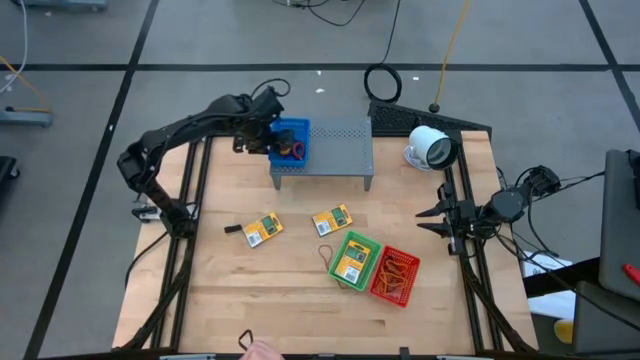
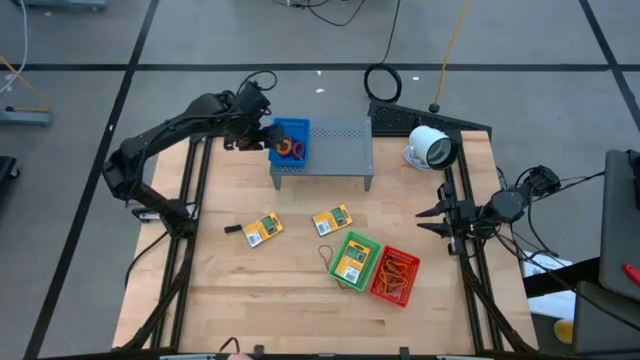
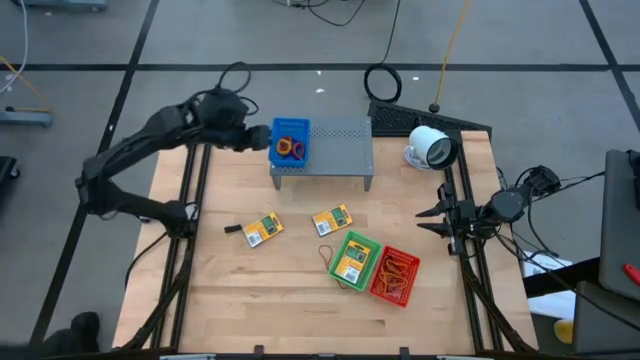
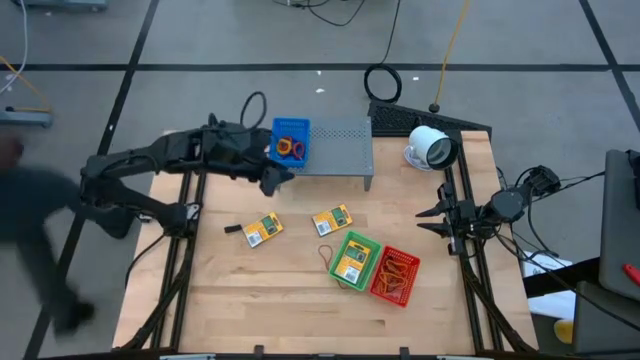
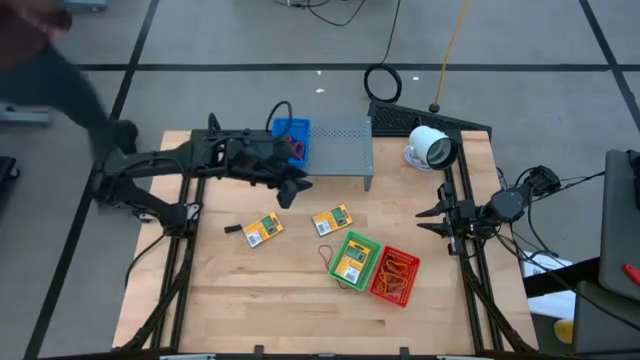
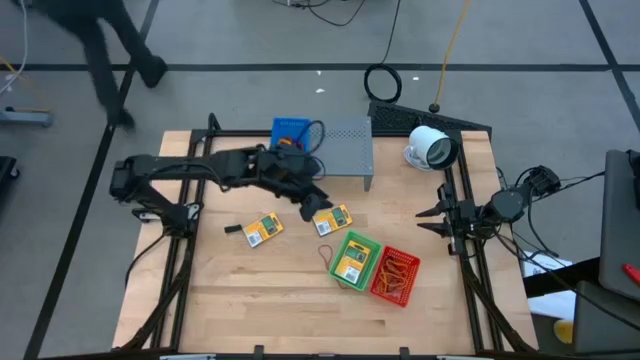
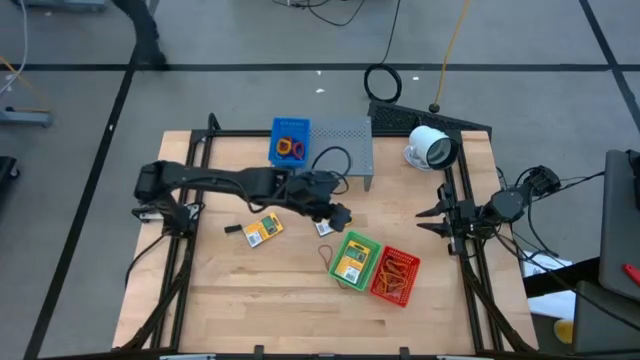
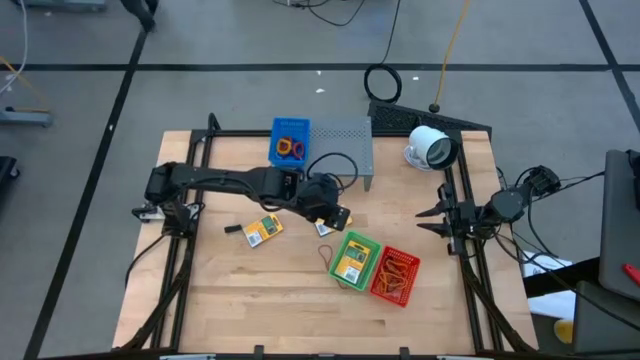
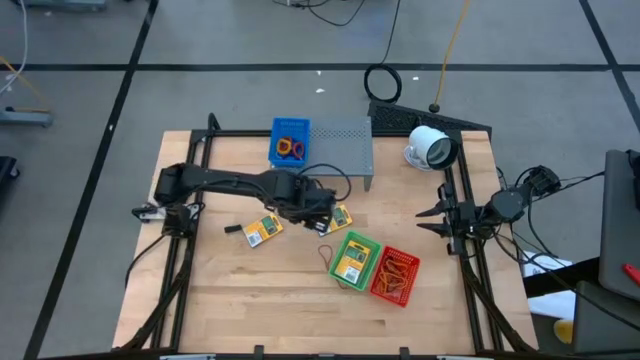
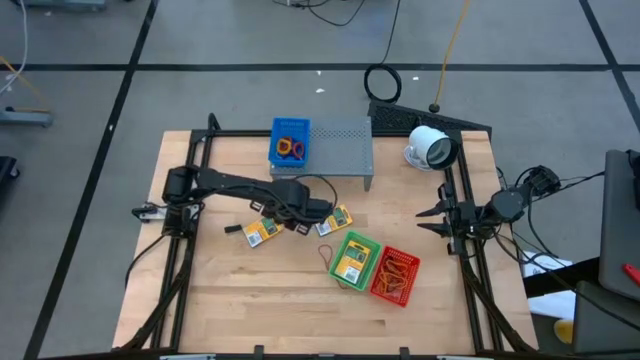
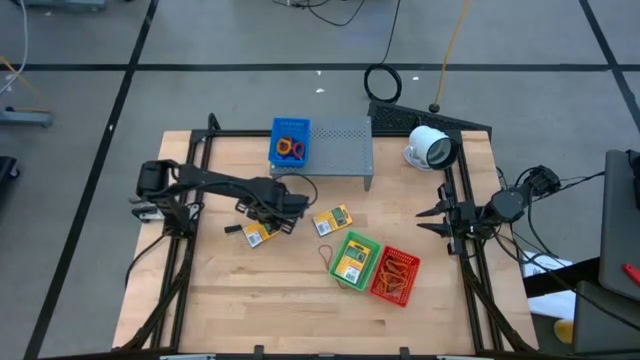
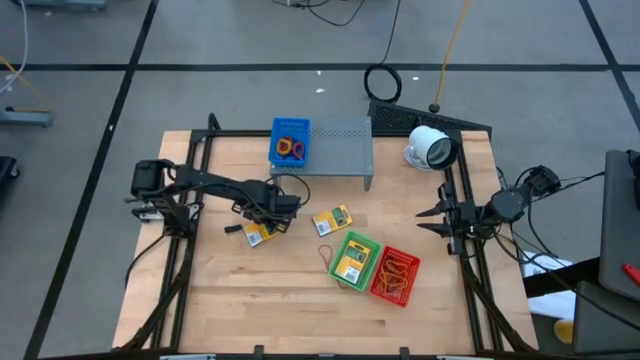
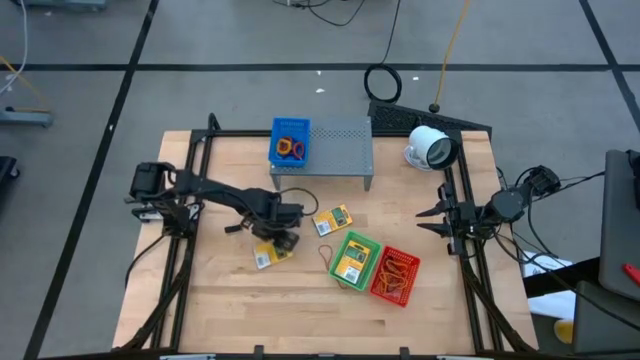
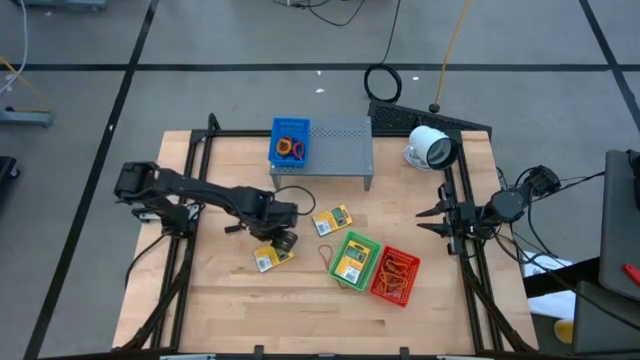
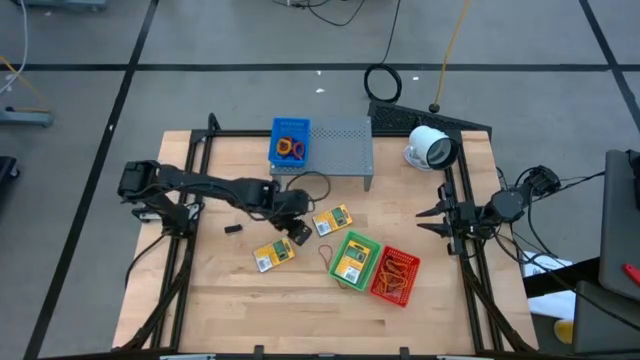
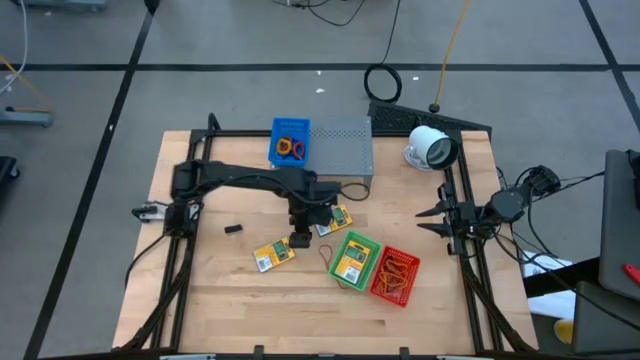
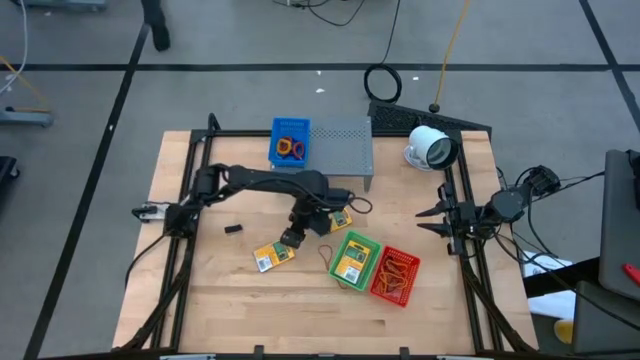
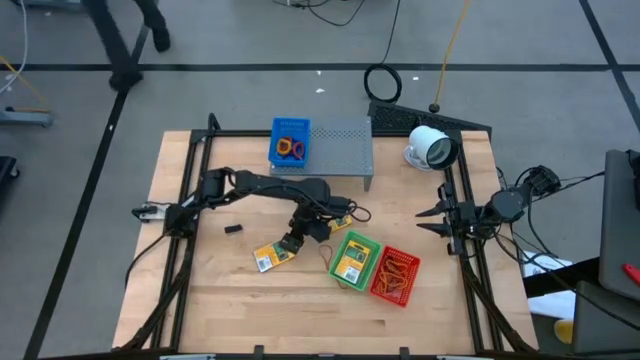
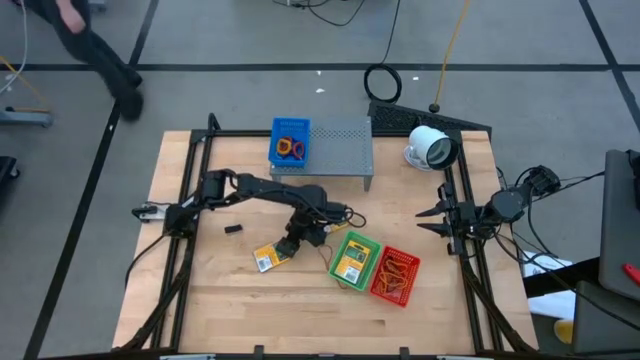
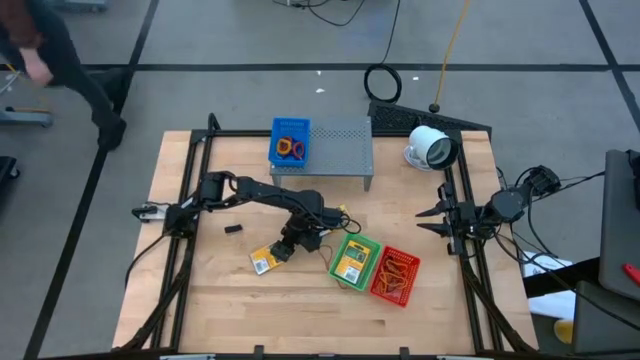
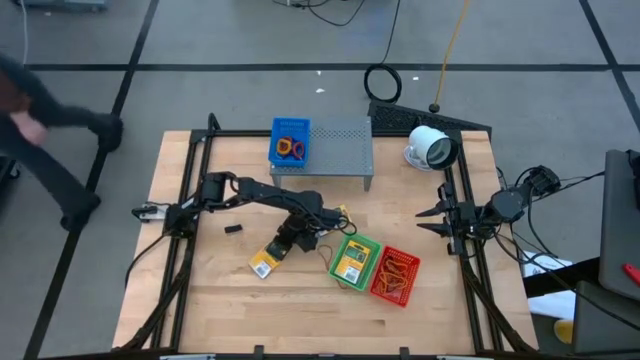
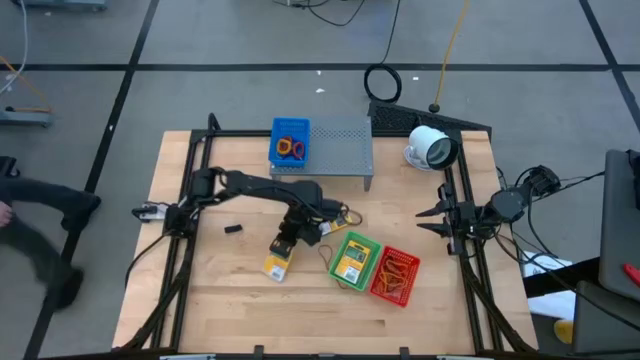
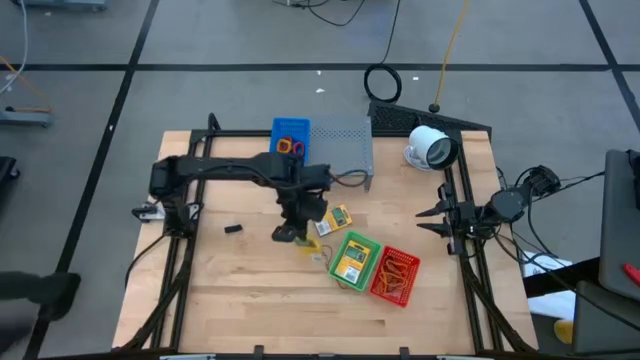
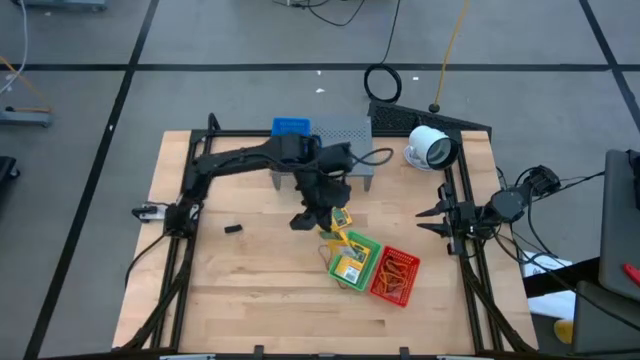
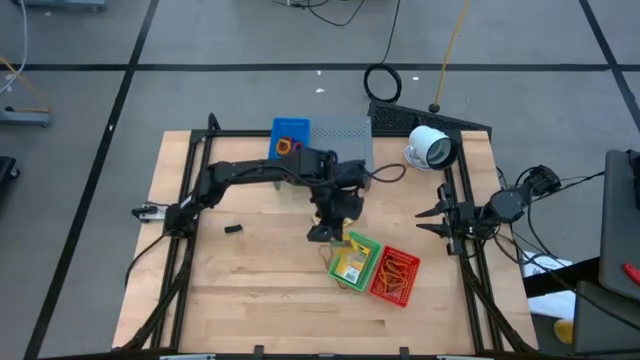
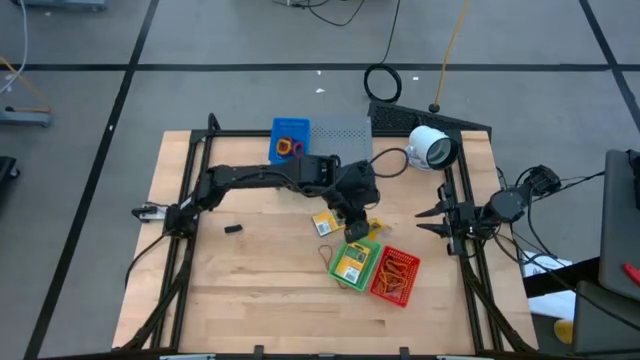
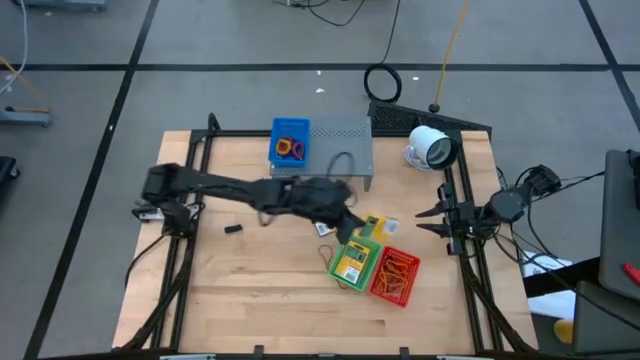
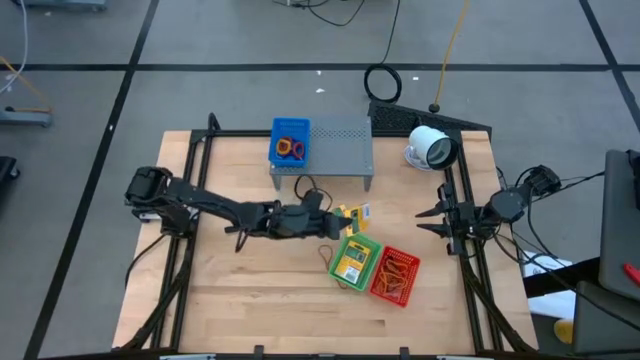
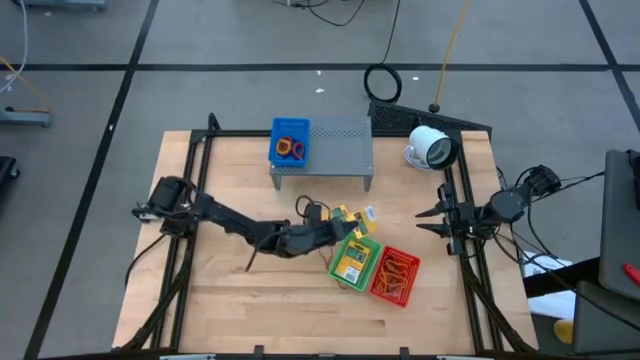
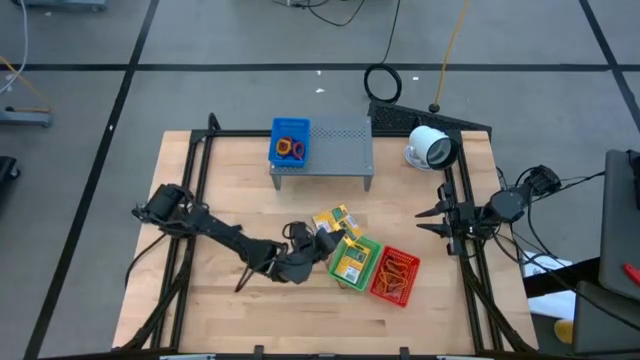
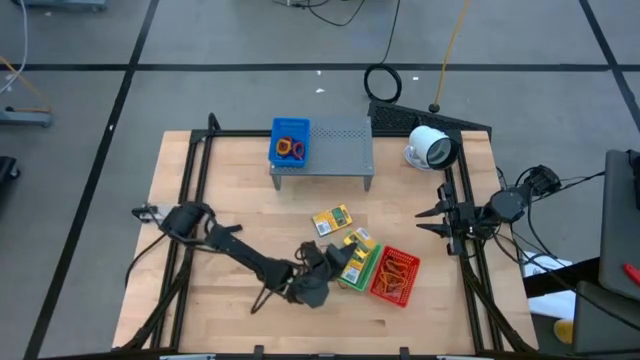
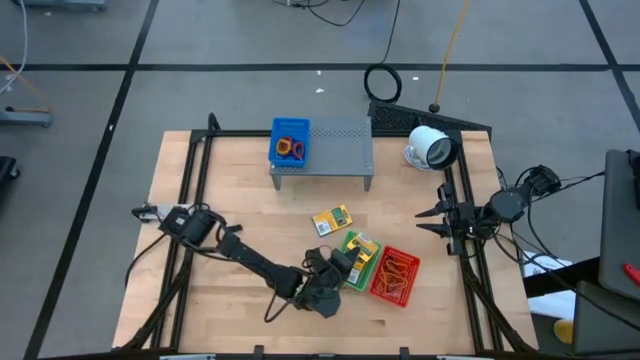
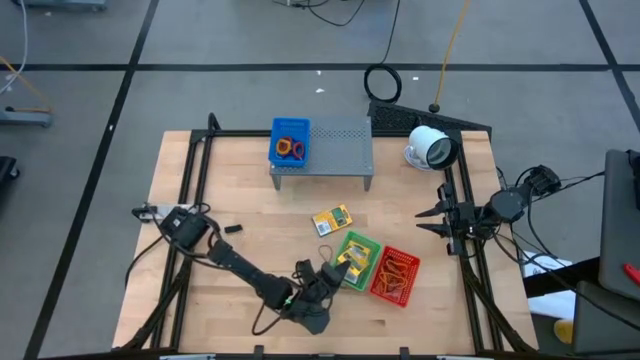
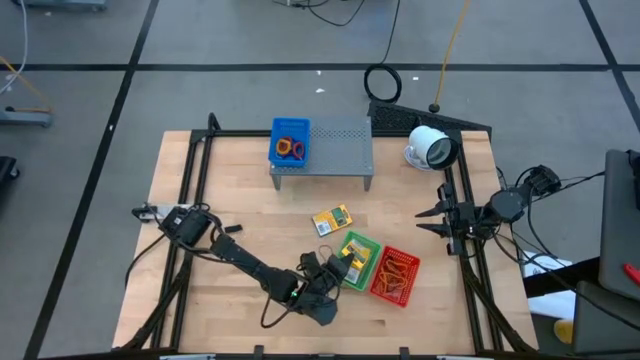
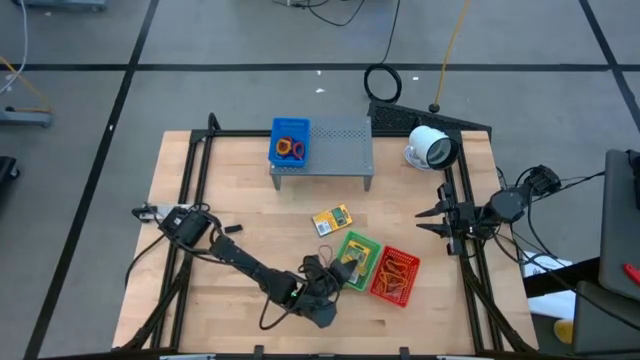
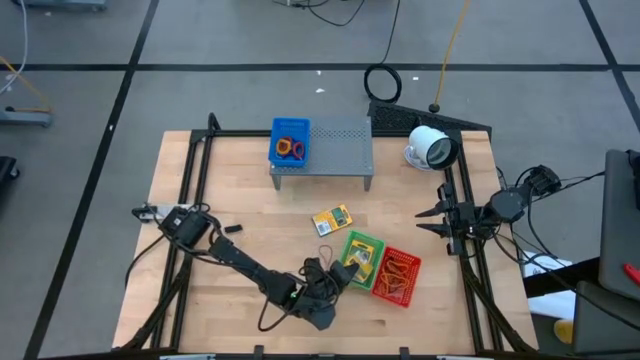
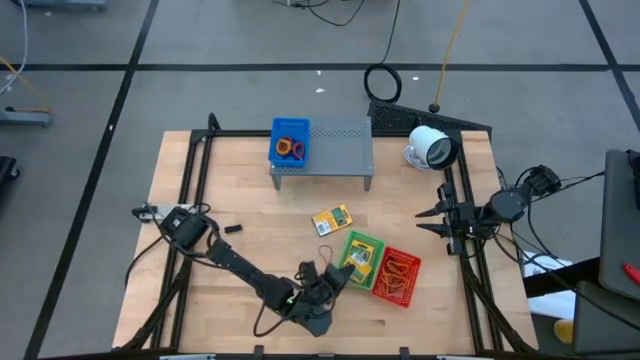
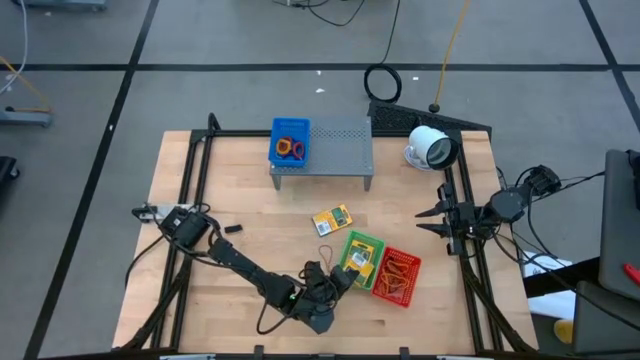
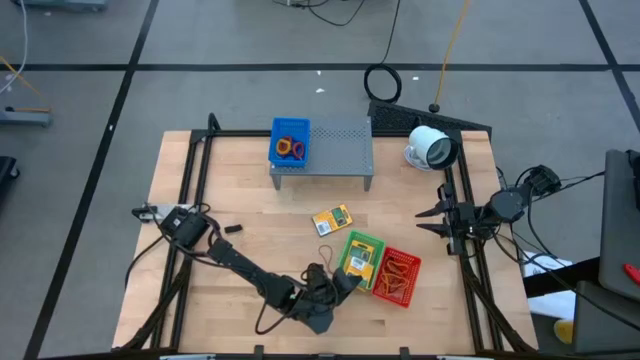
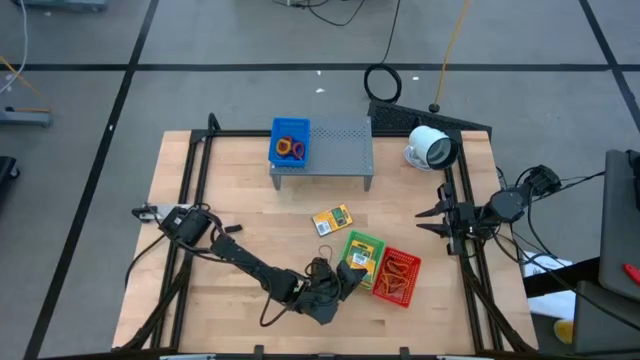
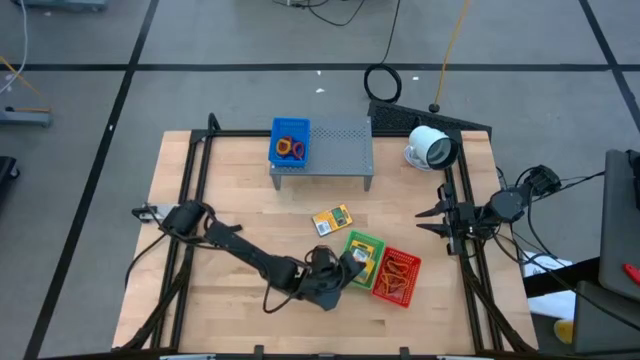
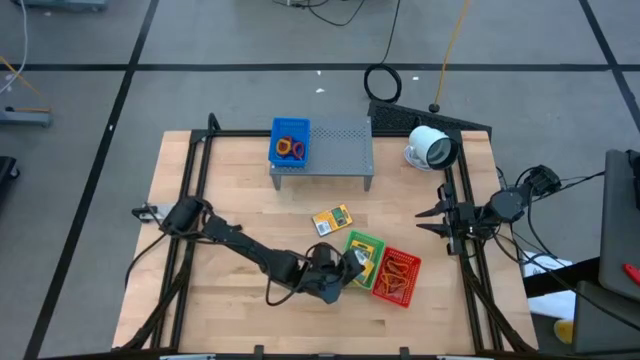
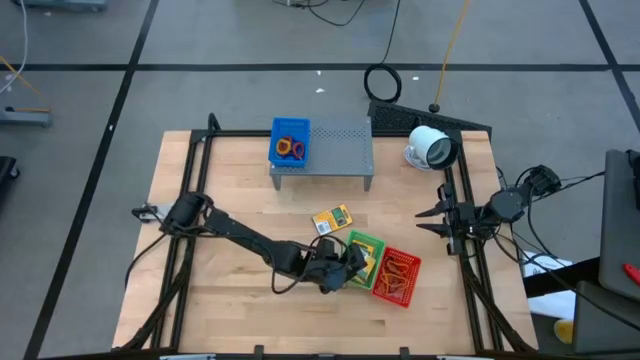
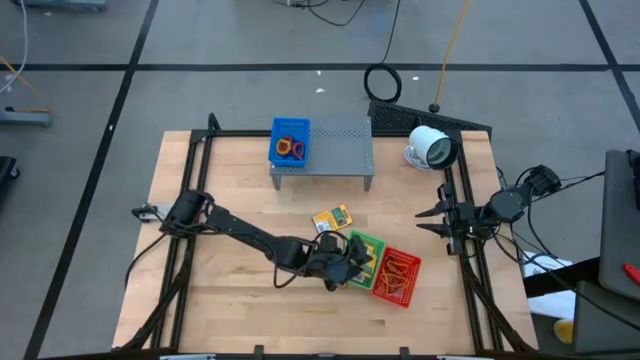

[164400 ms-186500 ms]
Task: Pick & Place Office Desk Supplies
Put the crayon box into the green bin
